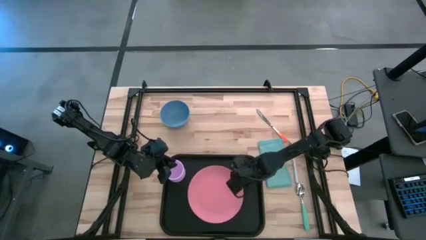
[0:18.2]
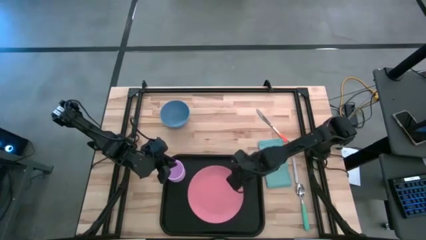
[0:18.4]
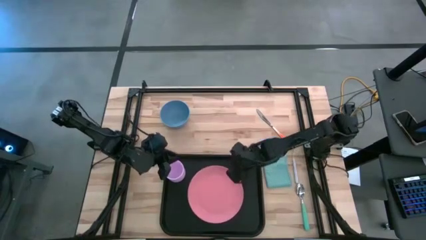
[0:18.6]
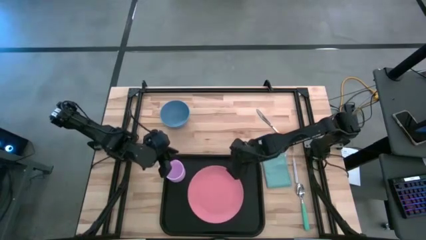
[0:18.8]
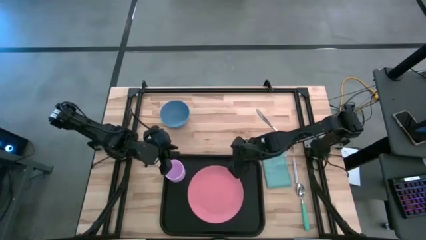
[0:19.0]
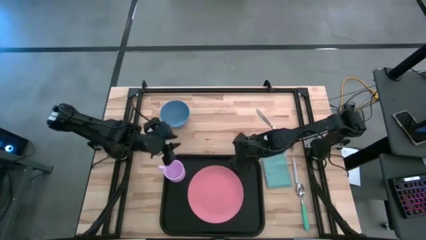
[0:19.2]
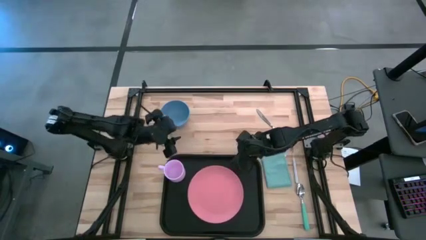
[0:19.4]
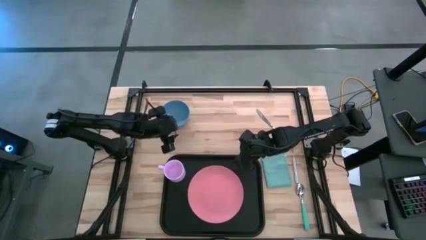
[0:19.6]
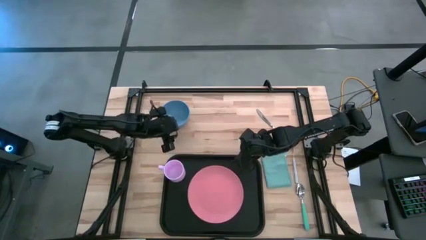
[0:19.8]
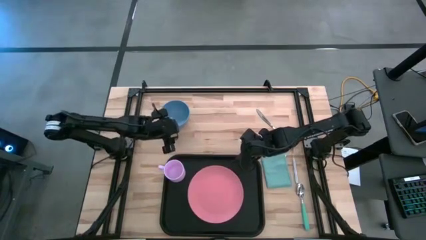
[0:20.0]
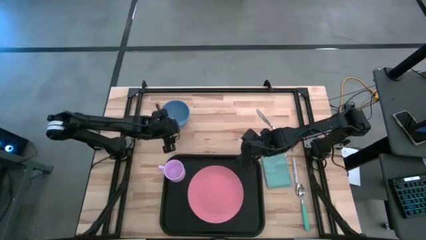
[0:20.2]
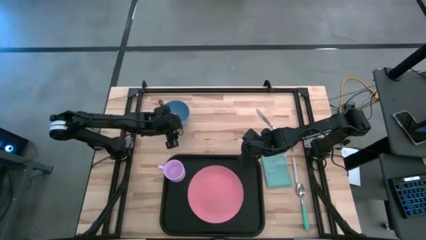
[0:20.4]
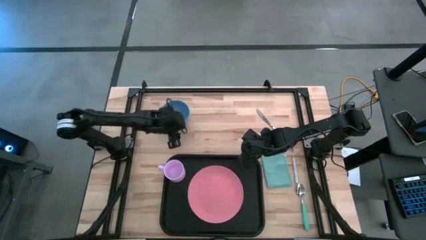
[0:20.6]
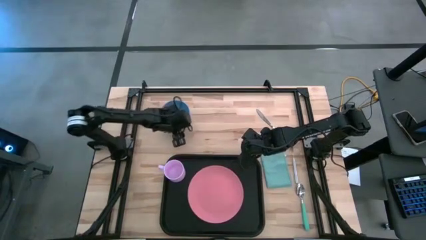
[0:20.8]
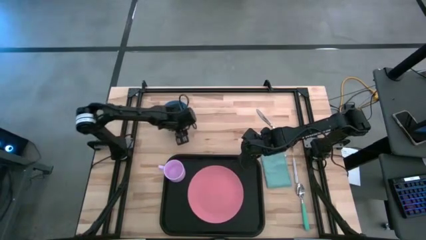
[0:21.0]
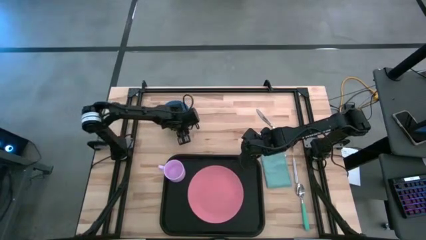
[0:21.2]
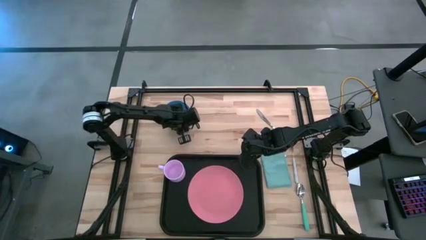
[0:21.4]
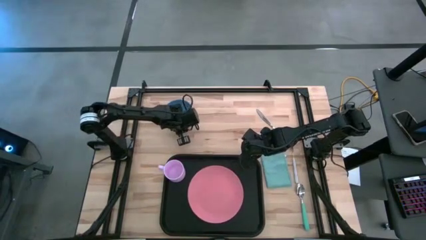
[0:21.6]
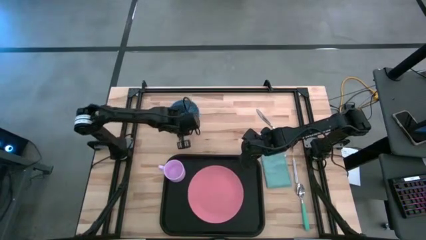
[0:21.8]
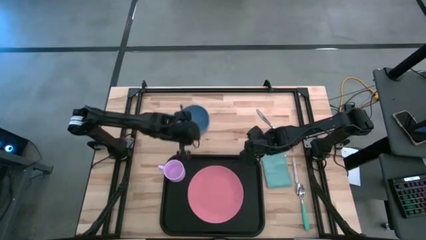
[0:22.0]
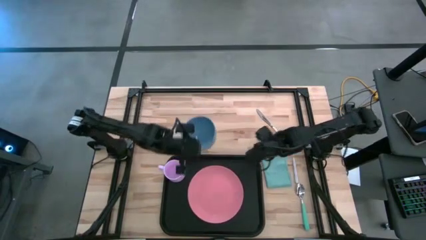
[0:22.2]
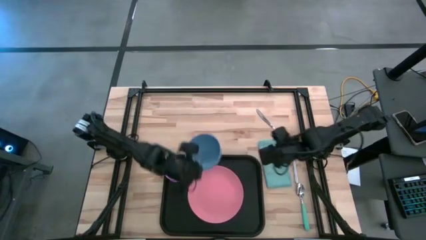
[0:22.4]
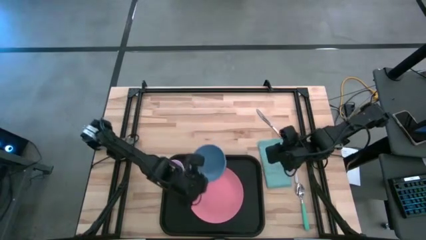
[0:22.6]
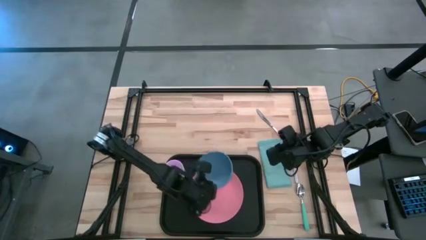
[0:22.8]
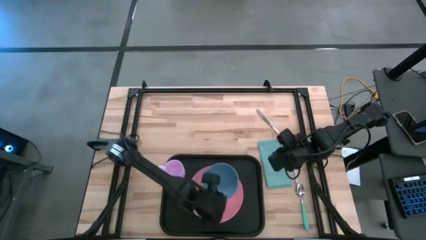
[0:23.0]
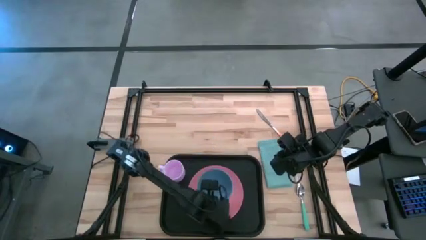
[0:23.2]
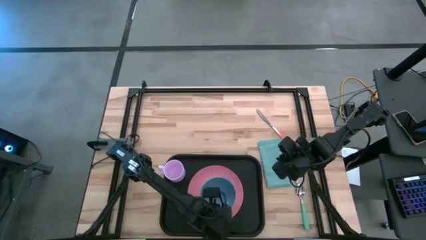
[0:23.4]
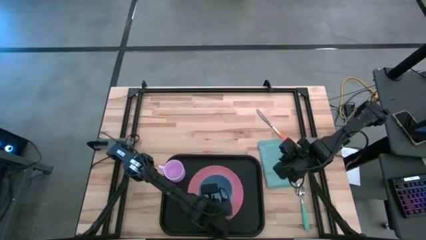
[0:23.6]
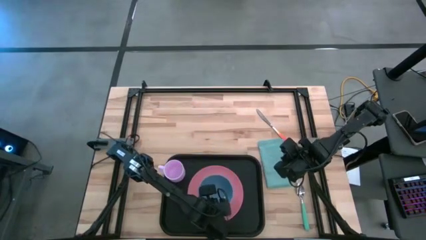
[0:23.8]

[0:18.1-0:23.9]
Task: Set up tray
Put the blue bowl on the pink plate

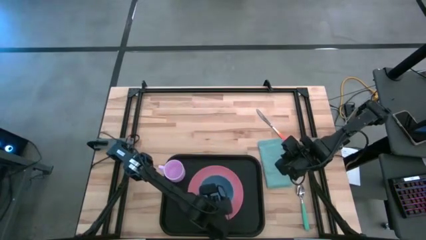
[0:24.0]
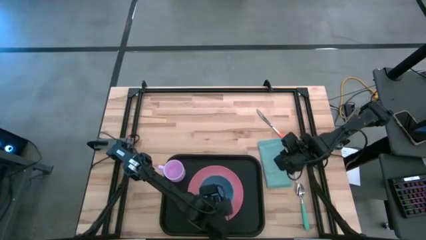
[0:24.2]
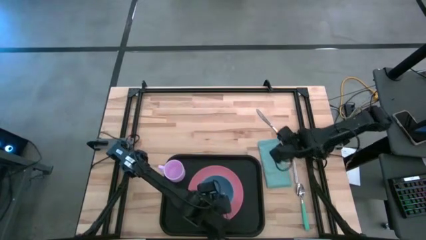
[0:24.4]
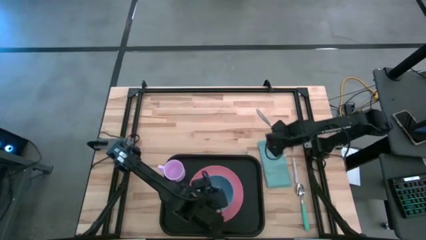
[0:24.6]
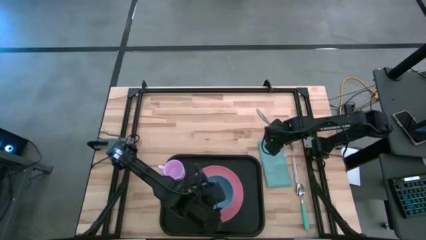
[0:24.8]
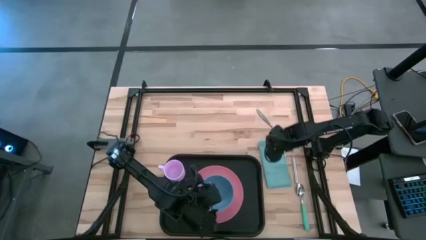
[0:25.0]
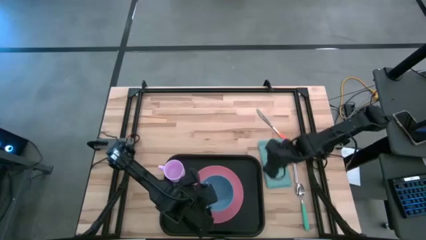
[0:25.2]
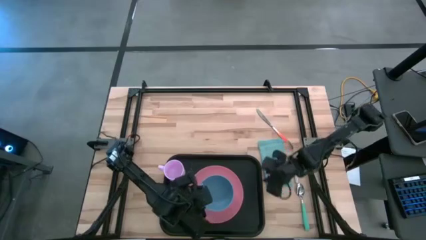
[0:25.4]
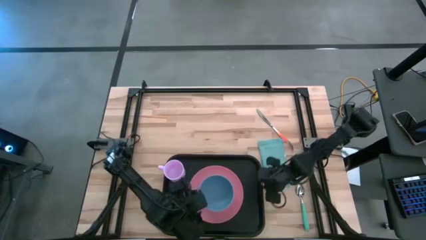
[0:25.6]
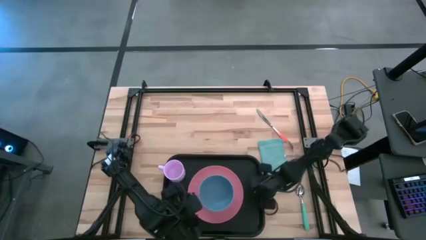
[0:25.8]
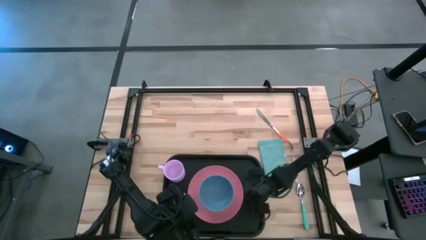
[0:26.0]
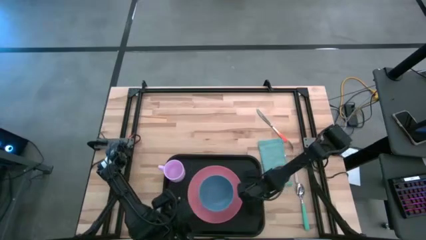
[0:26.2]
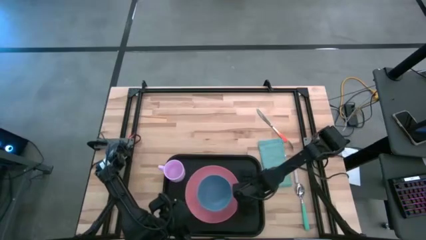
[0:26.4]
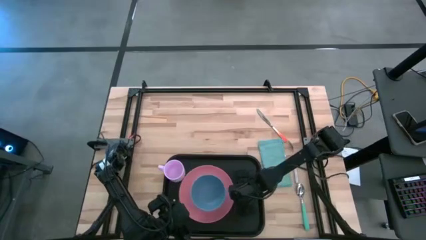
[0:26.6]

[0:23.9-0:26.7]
Adjust the plate

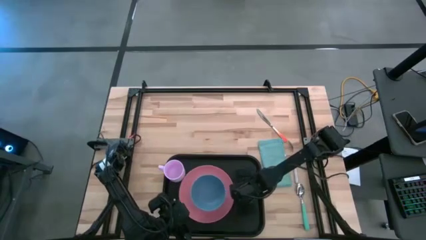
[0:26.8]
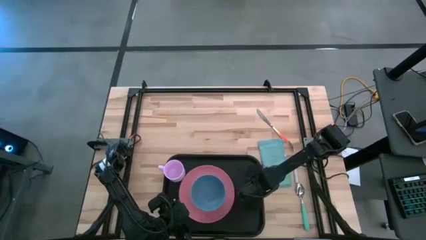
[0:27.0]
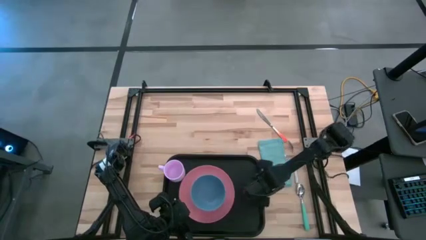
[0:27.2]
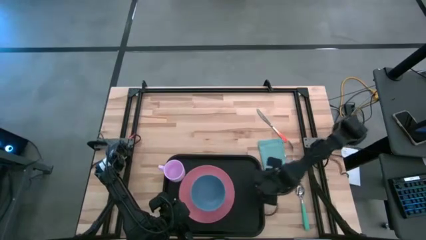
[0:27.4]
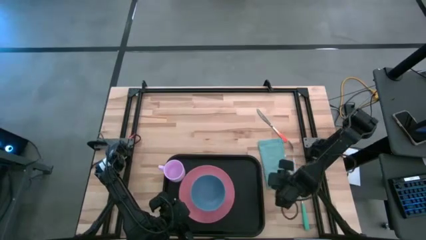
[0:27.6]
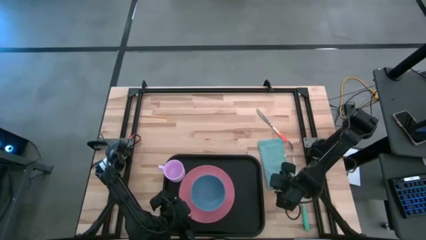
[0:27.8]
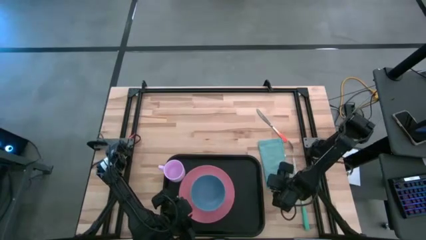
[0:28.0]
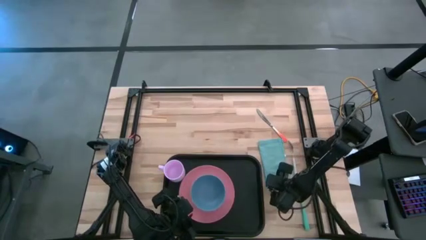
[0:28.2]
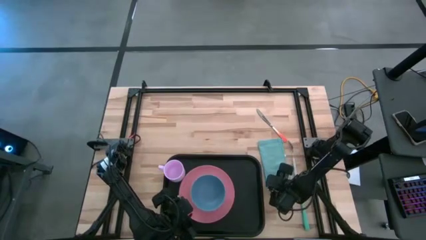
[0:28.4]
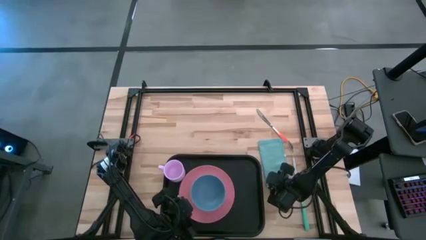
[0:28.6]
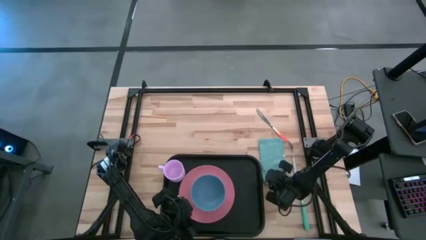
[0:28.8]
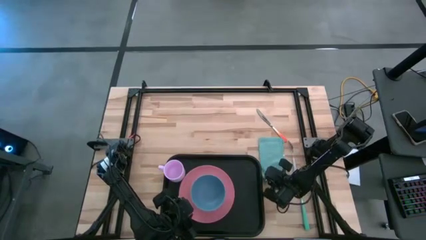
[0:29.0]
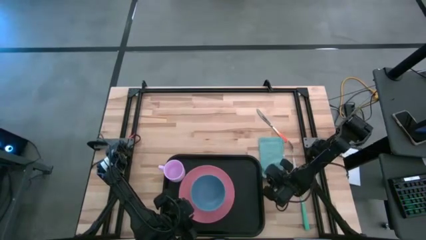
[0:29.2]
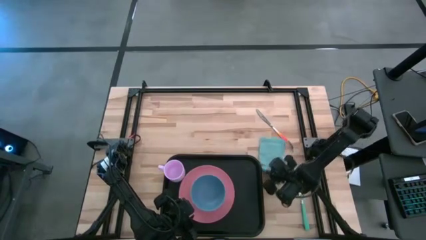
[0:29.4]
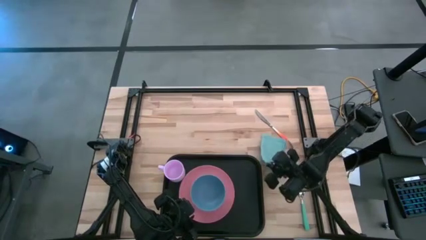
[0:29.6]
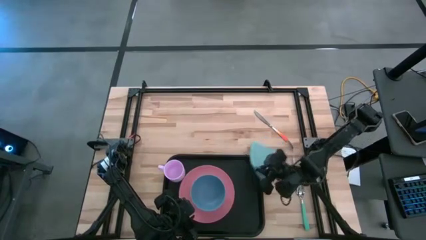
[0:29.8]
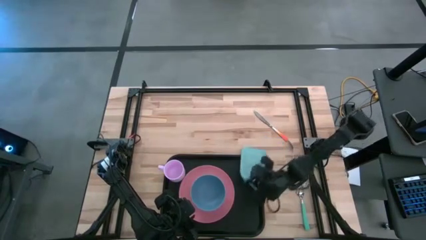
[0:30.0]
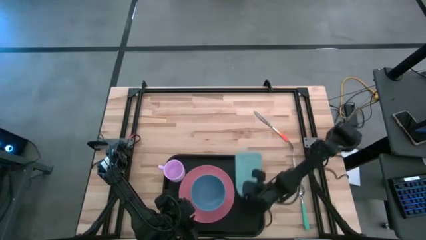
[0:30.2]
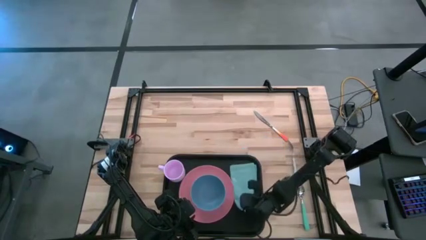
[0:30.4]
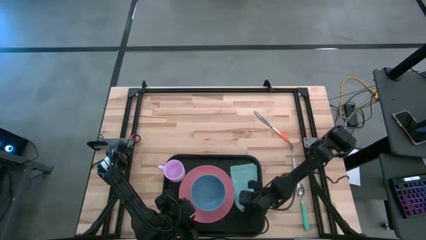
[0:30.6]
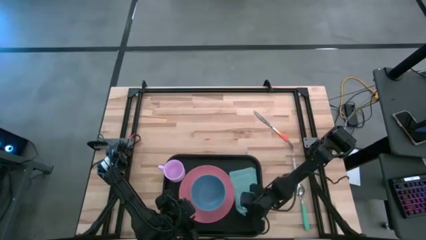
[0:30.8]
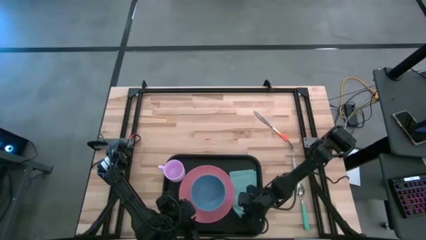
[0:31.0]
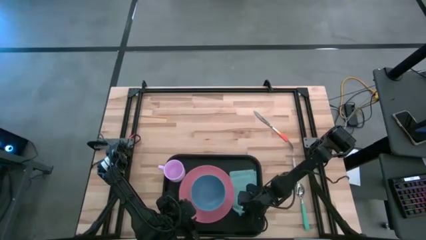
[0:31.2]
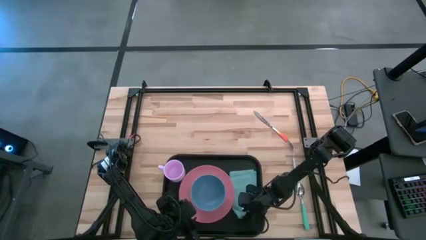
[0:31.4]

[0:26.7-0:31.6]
Put the napkin on the black tray beside the pink plate

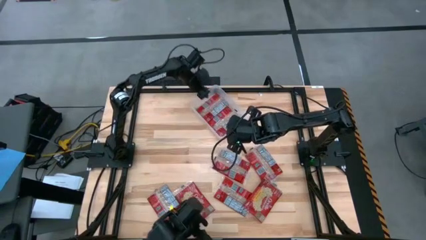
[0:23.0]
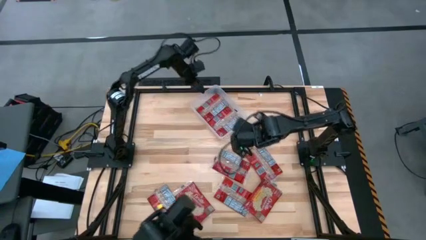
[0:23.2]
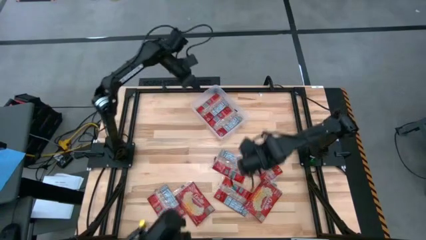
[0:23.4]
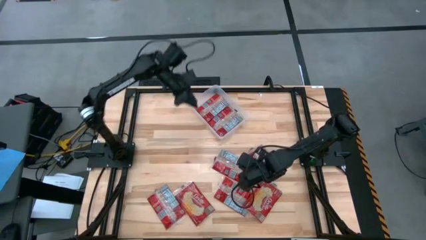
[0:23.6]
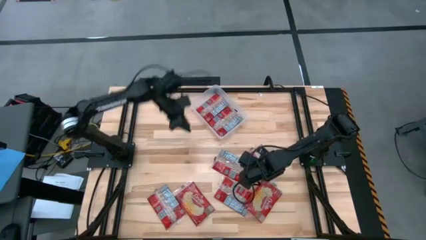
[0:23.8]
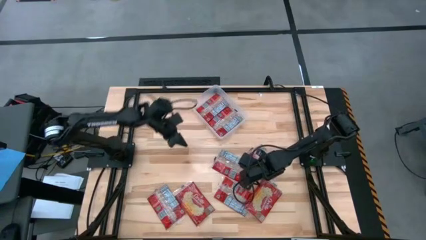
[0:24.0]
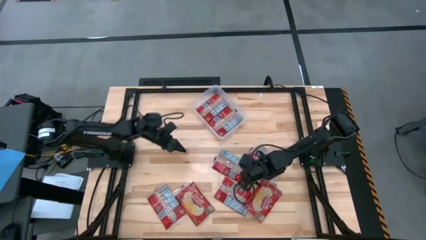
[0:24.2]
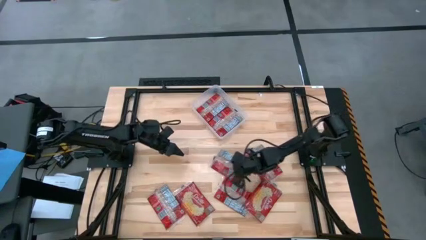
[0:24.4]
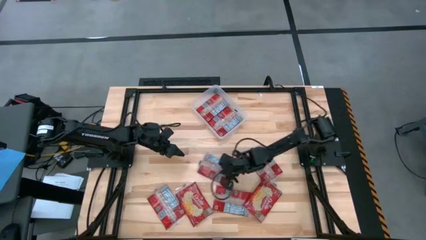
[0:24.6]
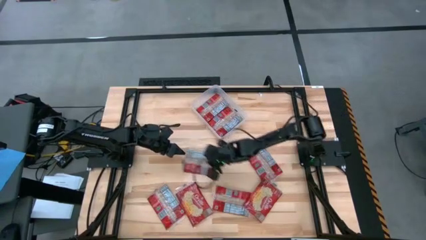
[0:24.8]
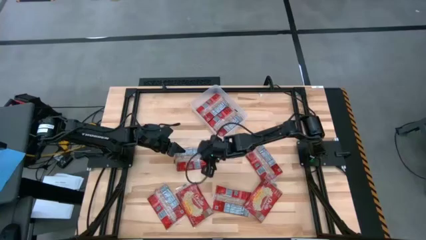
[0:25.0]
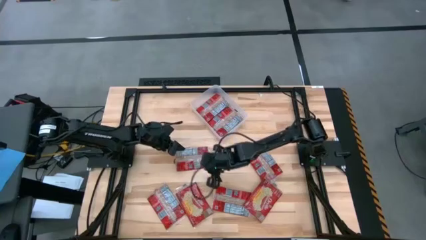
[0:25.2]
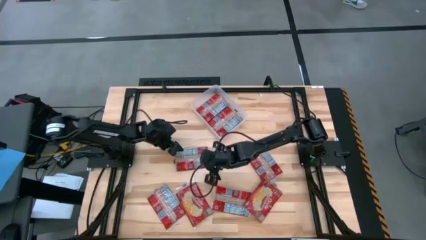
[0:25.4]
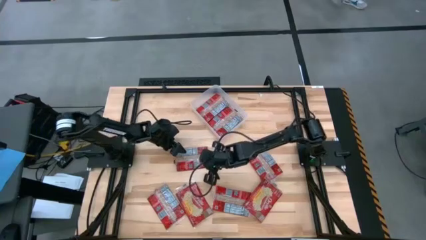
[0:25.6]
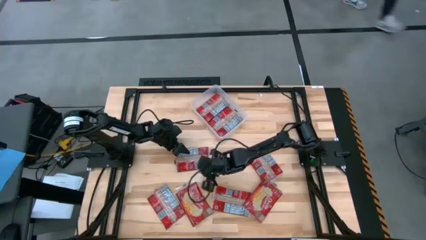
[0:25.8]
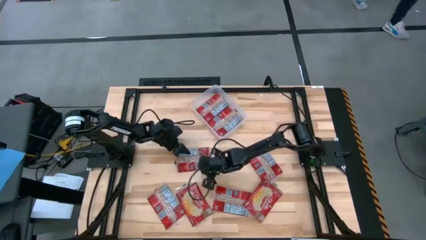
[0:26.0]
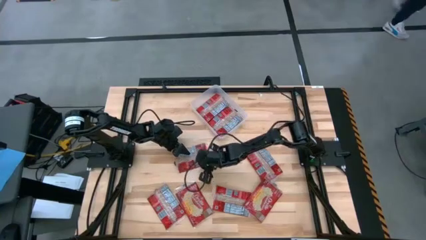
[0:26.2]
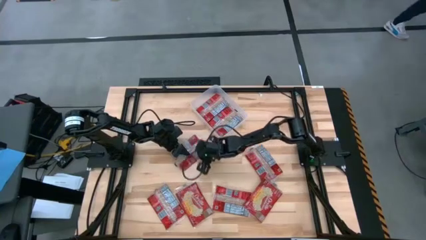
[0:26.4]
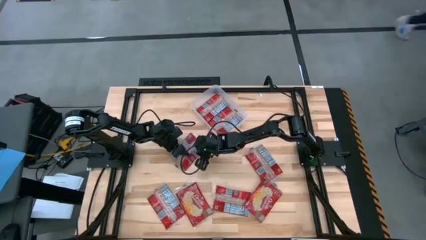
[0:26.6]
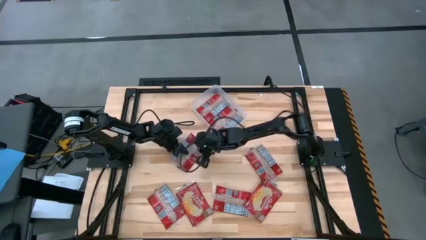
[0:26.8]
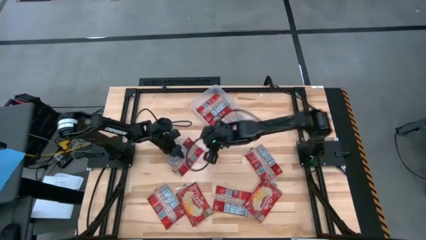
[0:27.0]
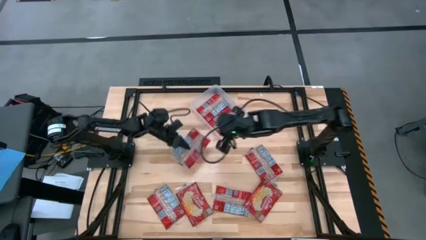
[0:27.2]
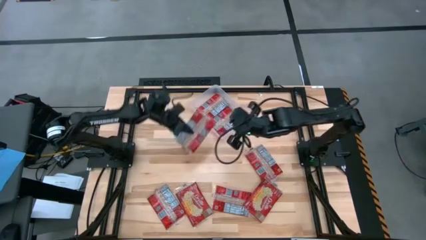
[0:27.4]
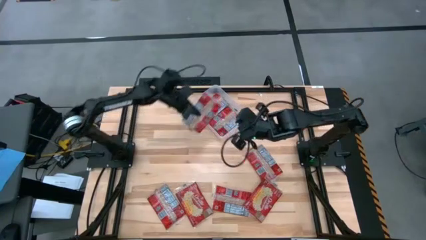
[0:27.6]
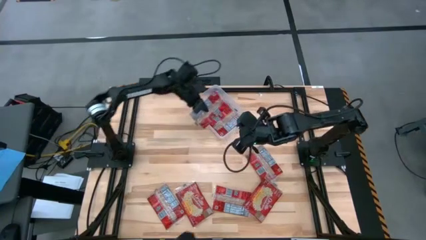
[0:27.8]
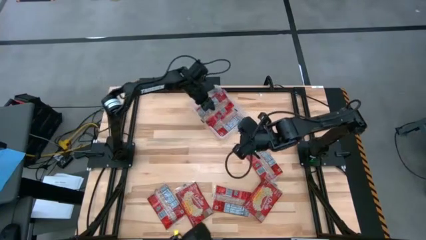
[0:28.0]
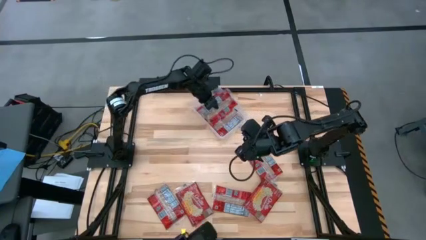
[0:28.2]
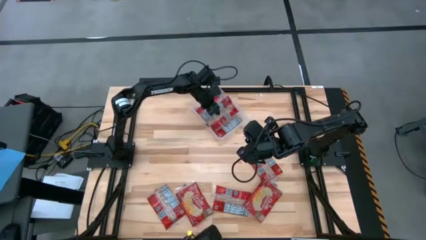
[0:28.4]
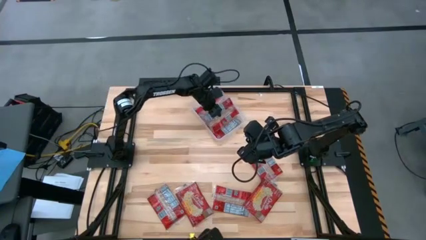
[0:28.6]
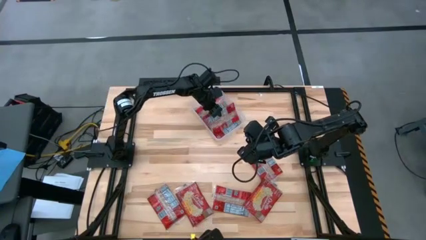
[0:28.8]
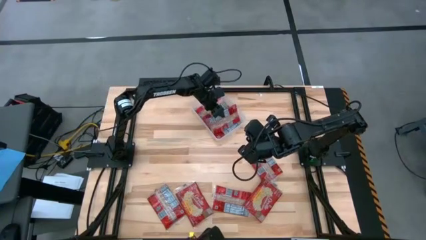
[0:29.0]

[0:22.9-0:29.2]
Task: Sort popcorn bags into baskets
Put the red popcorn bag into the white bin
